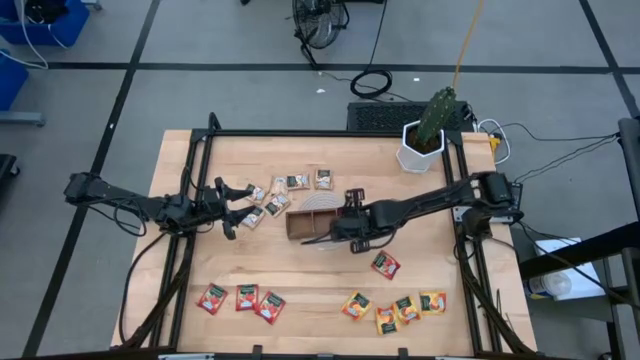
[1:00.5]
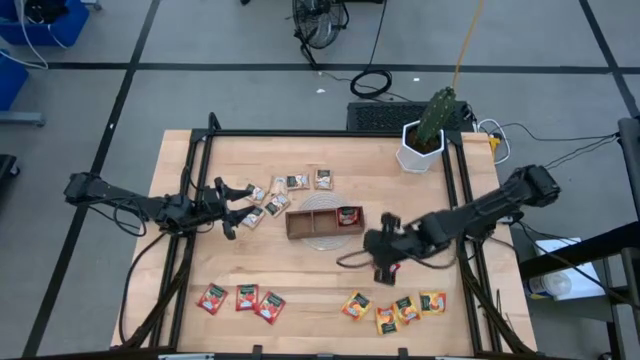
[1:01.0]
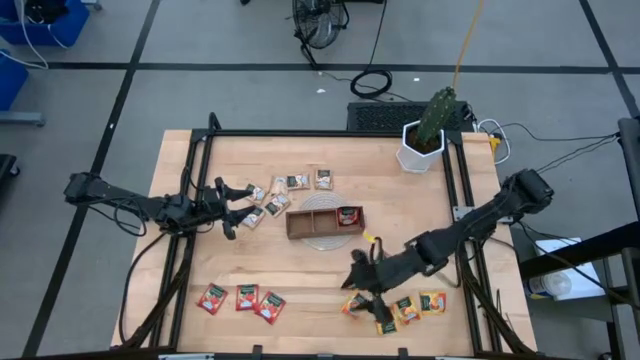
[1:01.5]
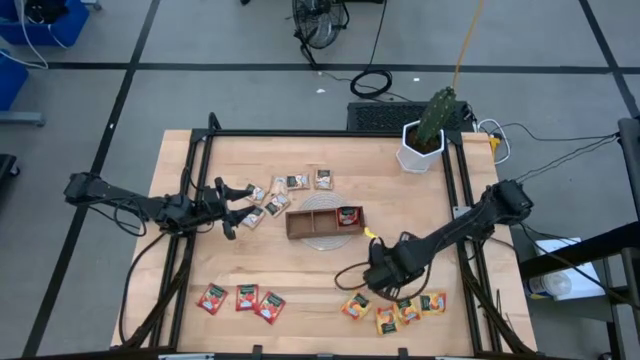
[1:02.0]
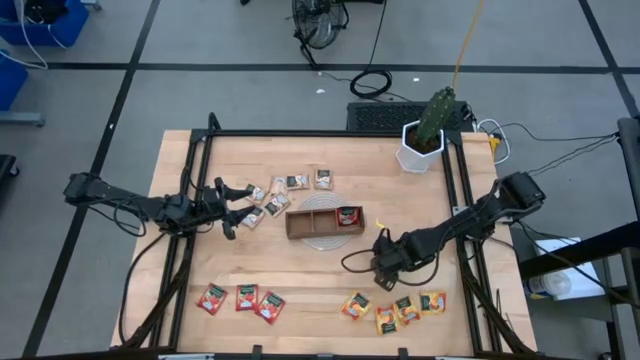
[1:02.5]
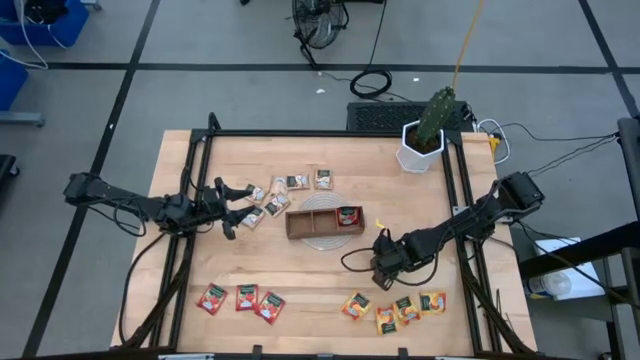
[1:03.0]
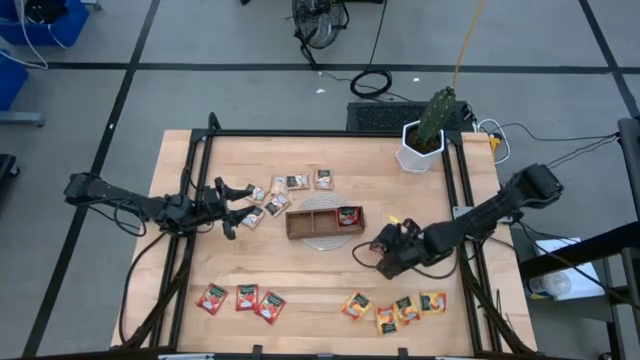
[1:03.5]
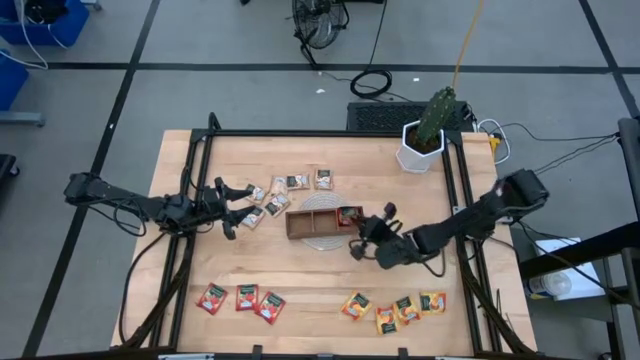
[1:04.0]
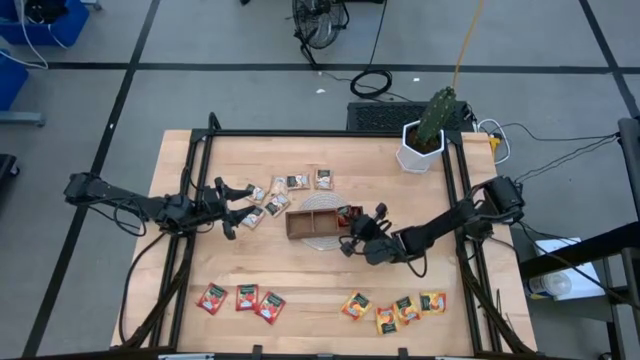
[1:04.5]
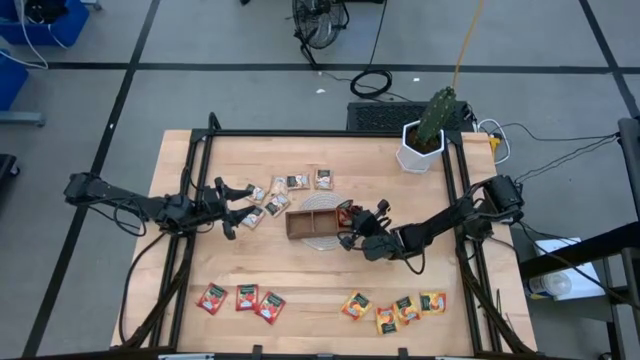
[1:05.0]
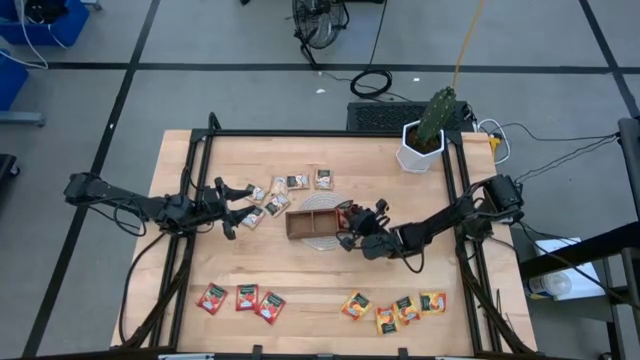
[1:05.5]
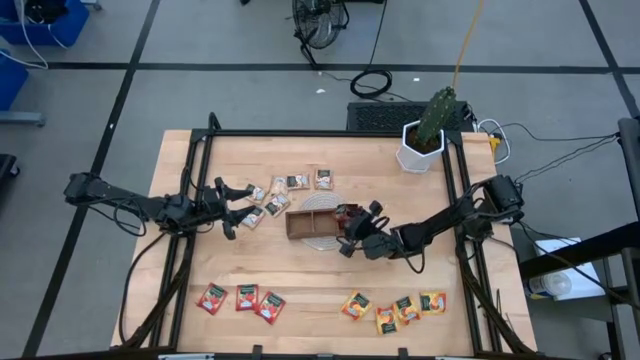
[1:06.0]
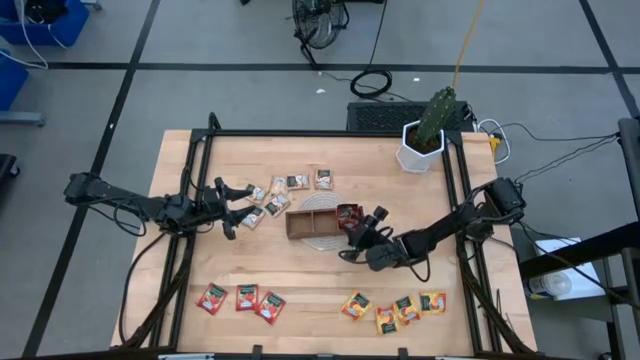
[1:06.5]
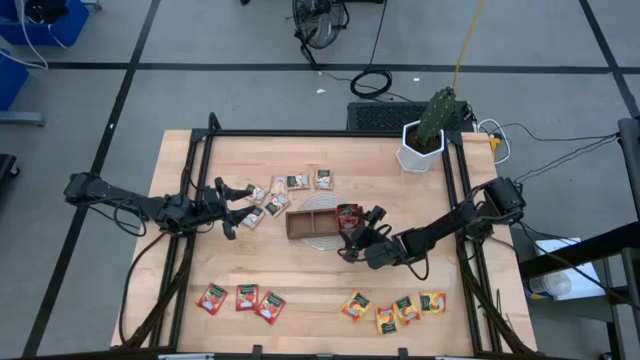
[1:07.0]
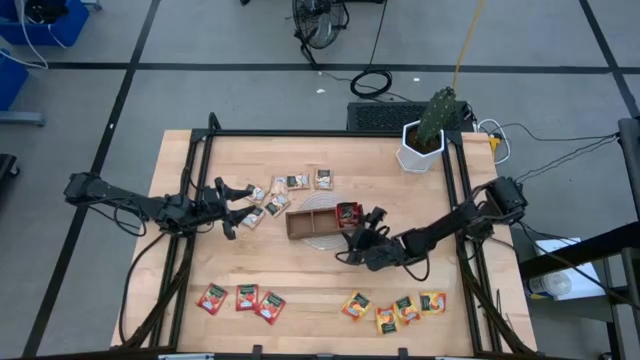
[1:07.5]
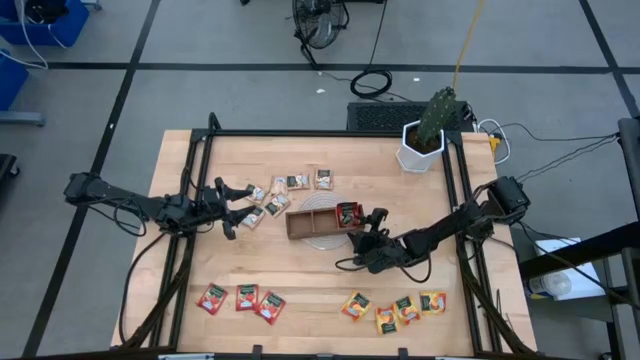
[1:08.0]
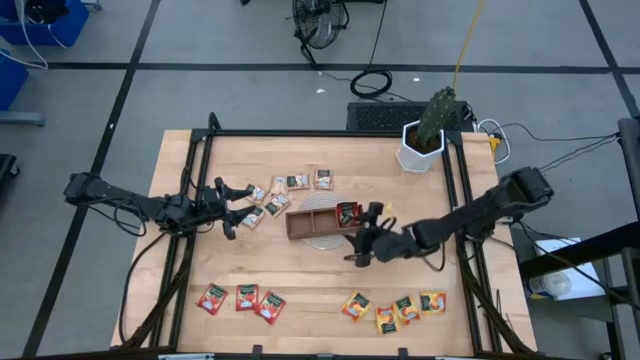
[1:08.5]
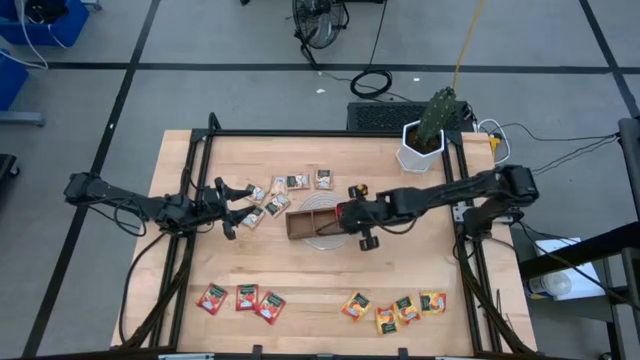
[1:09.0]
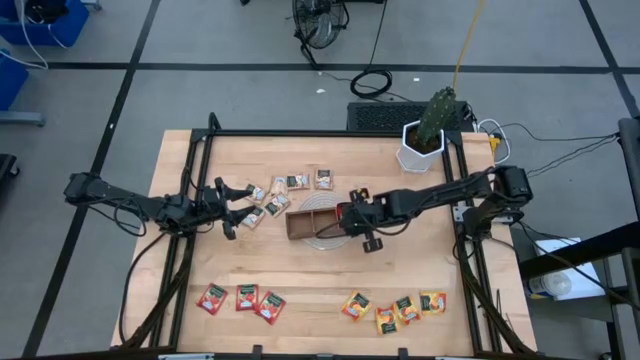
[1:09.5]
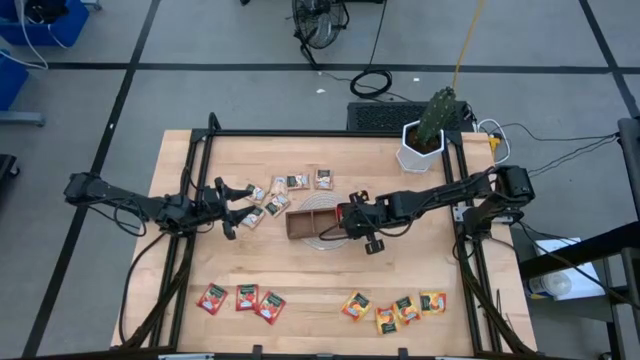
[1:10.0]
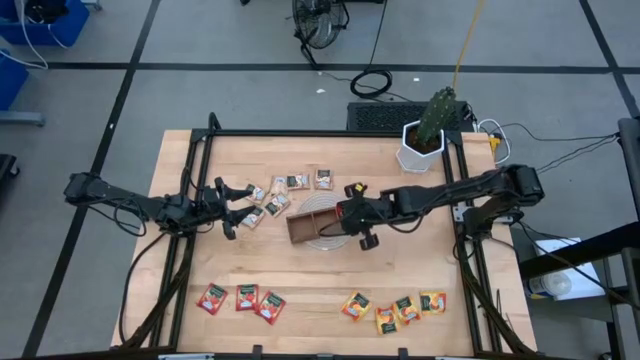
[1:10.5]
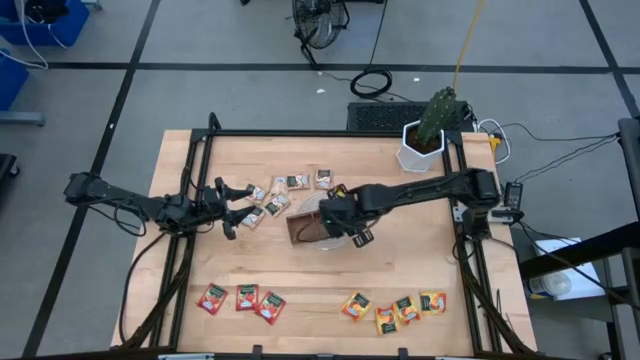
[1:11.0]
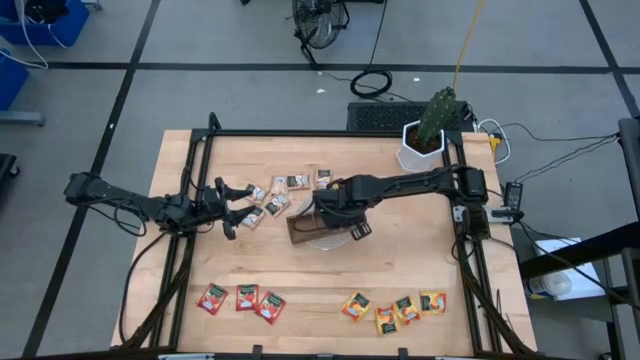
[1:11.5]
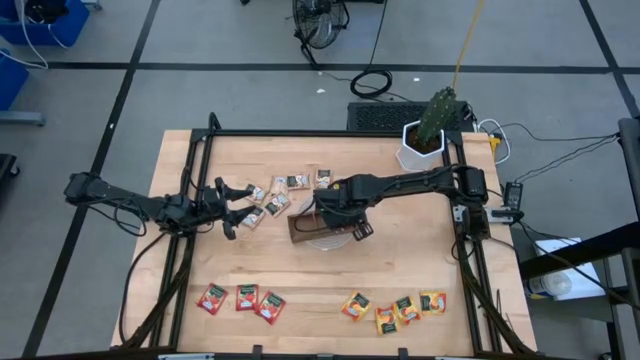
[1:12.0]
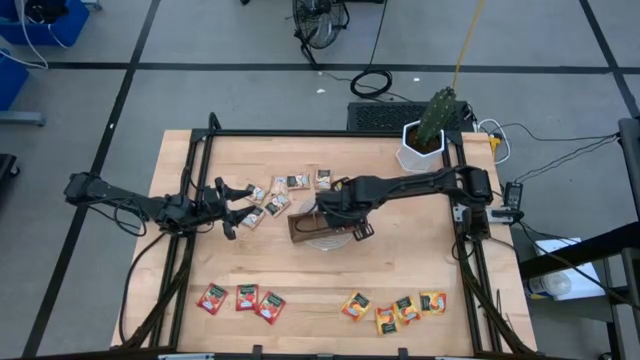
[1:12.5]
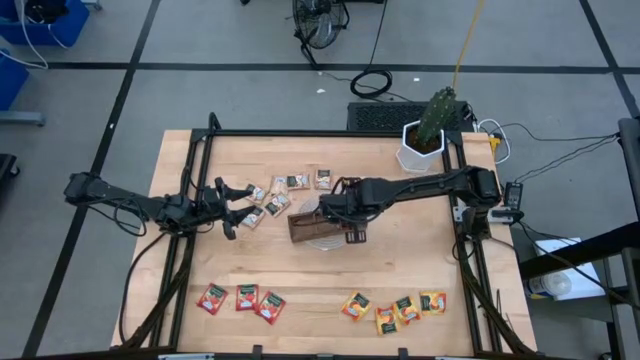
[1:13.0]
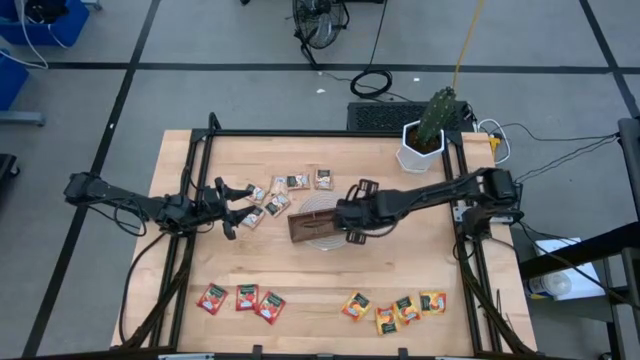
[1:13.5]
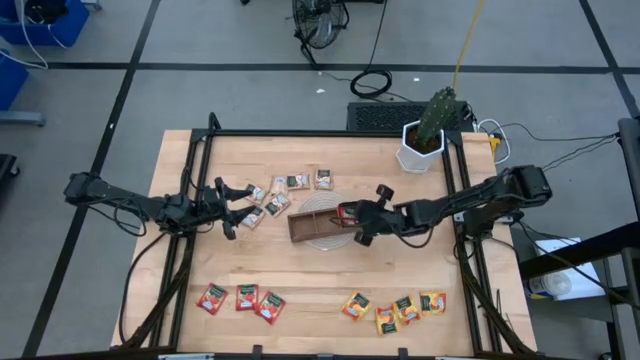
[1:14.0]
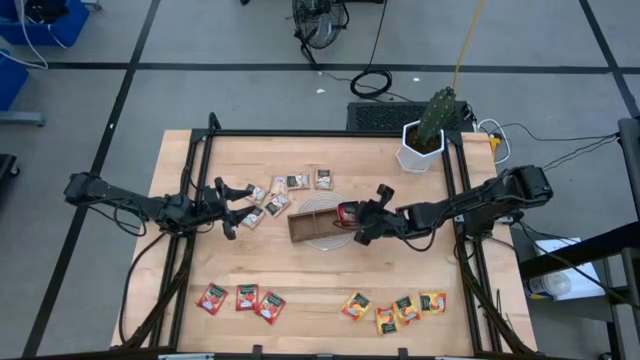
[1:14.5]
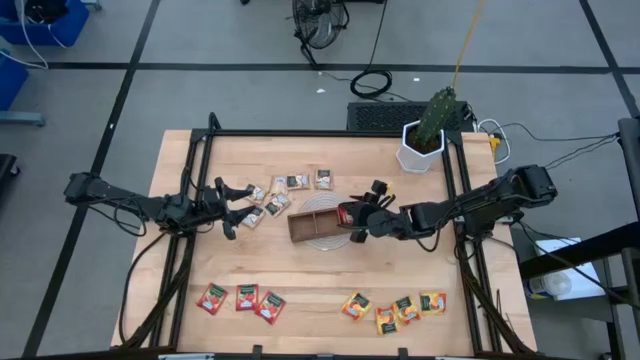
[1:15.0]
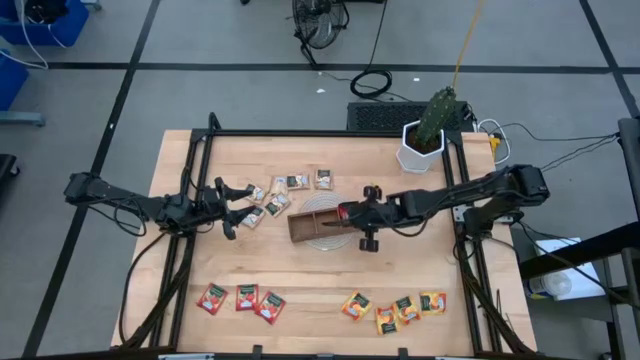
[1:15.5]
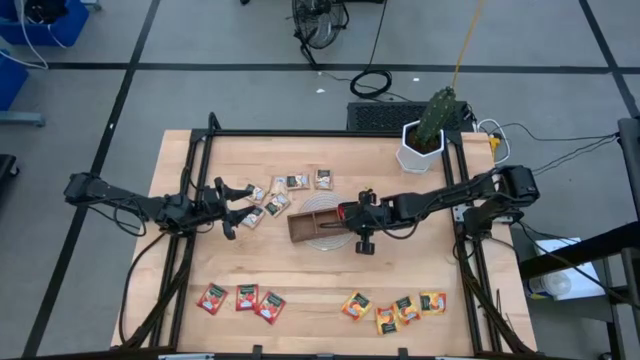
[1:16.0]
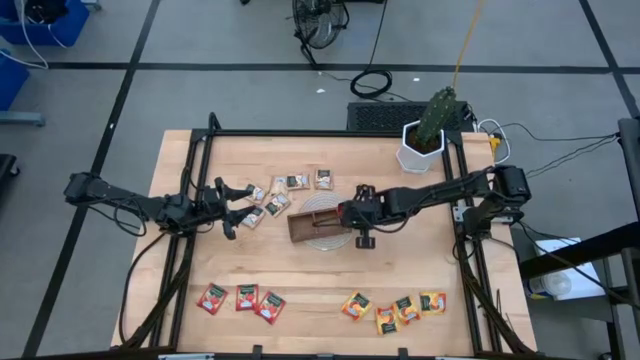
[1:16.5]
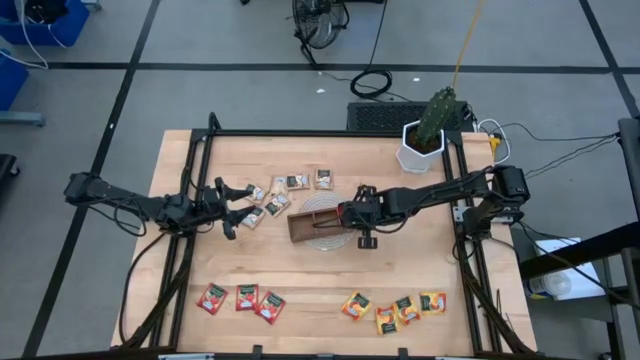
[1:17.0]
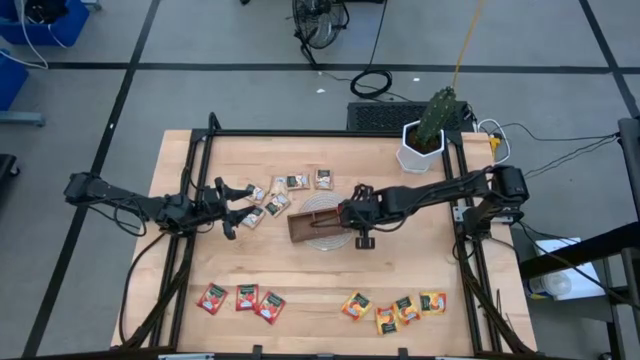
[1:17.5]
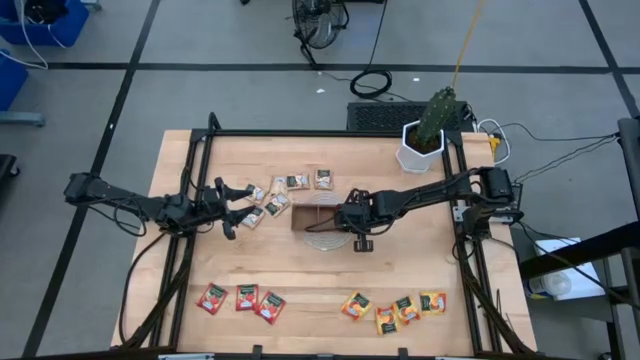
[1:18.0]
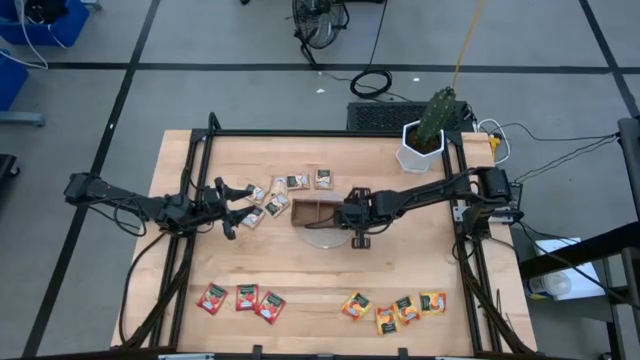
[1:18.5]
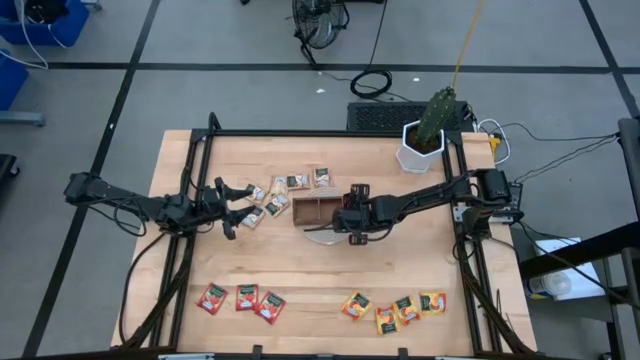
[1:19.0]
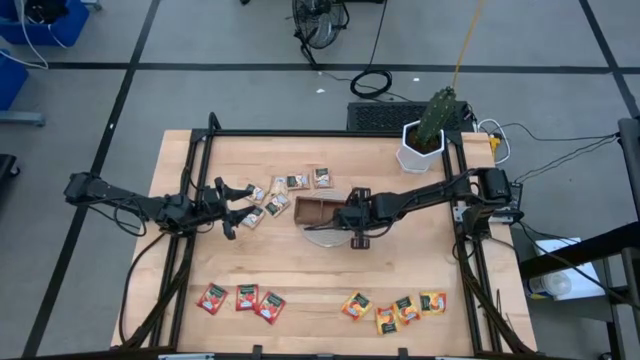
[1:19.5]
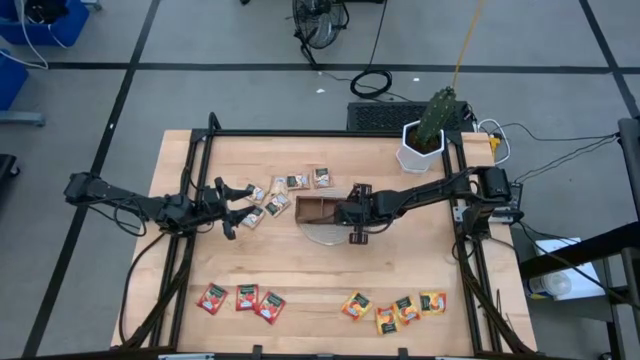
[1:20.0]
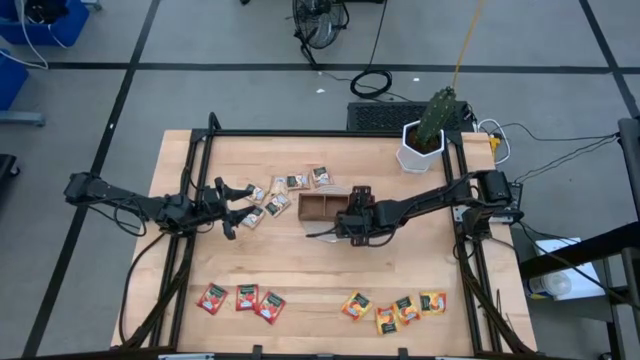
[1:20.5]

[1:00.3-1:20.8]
Task: Pick & Place Tea
Put the red tea bag into the right section of the wood organizer
